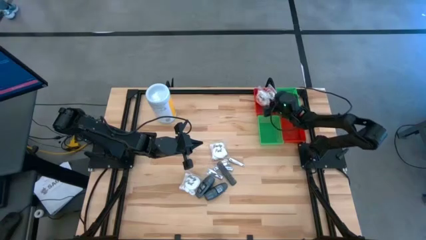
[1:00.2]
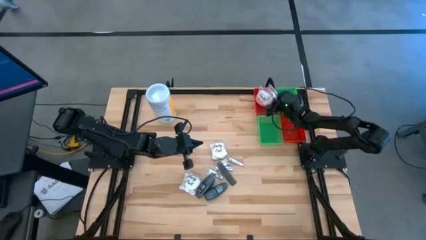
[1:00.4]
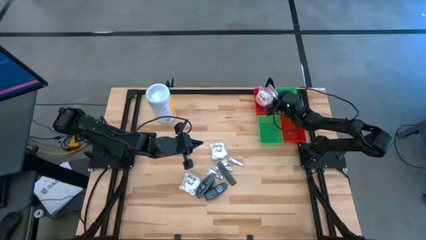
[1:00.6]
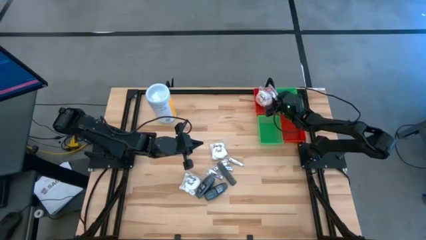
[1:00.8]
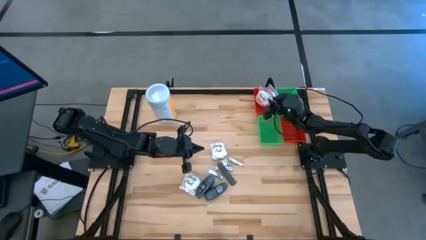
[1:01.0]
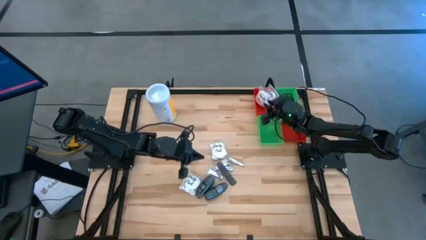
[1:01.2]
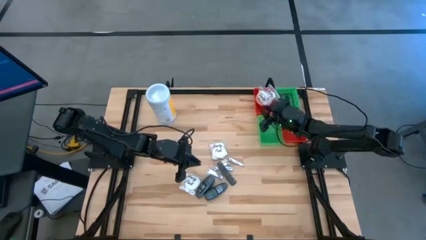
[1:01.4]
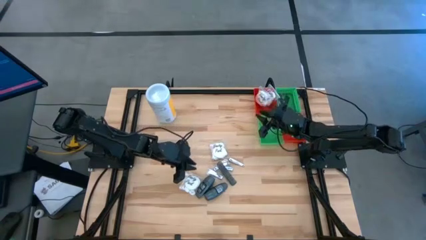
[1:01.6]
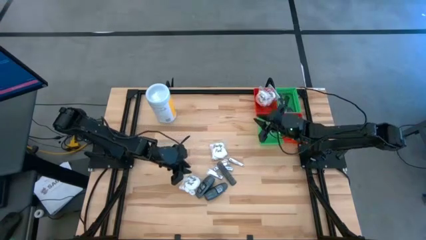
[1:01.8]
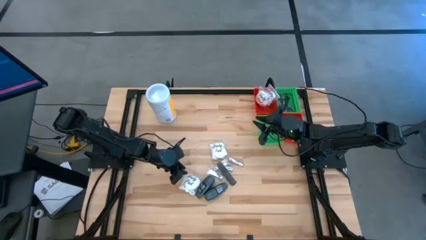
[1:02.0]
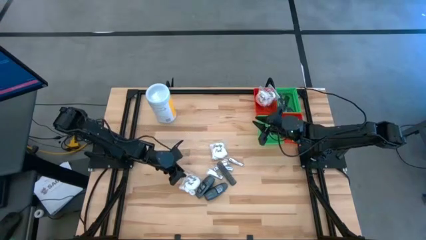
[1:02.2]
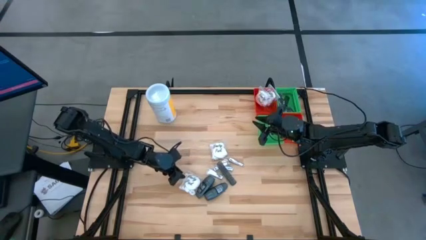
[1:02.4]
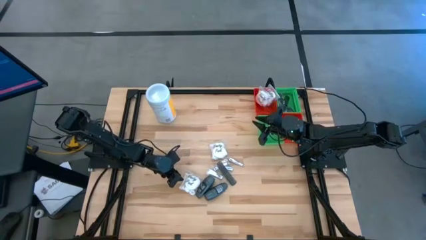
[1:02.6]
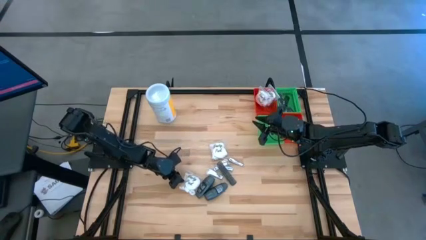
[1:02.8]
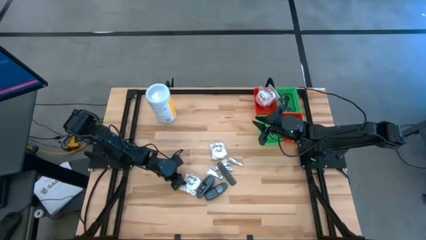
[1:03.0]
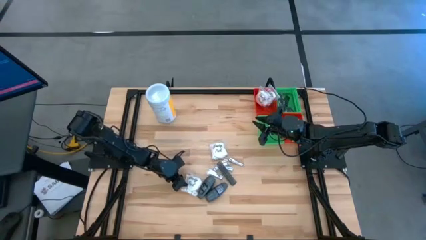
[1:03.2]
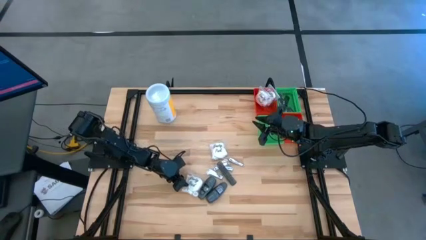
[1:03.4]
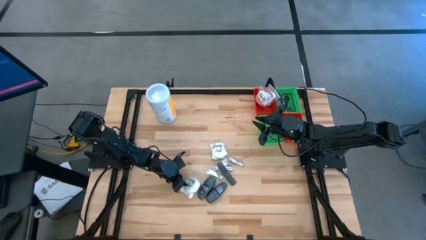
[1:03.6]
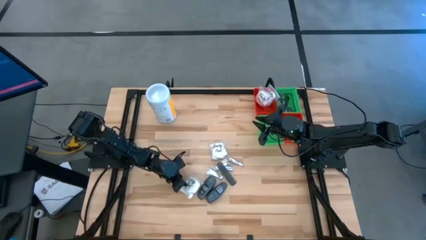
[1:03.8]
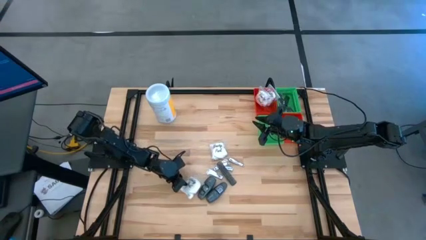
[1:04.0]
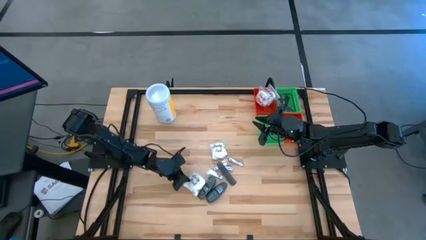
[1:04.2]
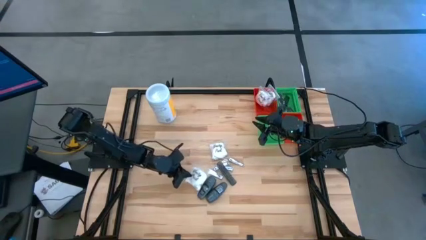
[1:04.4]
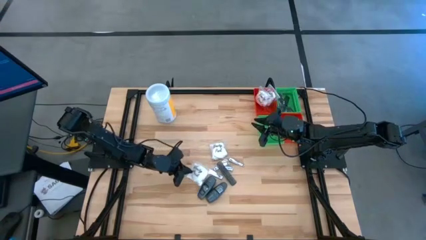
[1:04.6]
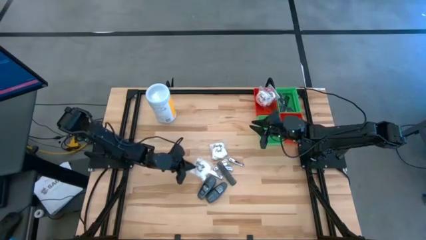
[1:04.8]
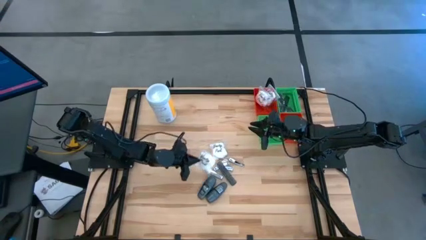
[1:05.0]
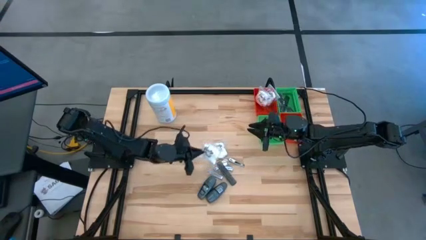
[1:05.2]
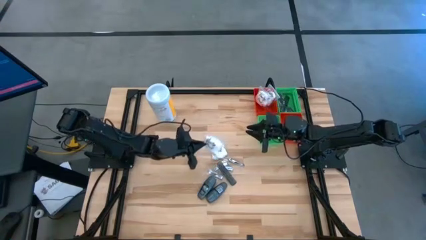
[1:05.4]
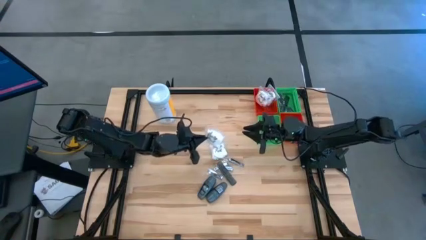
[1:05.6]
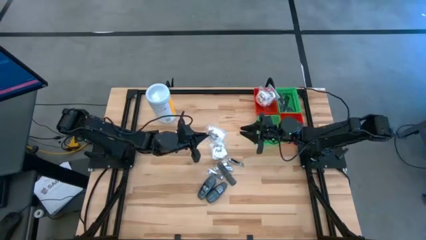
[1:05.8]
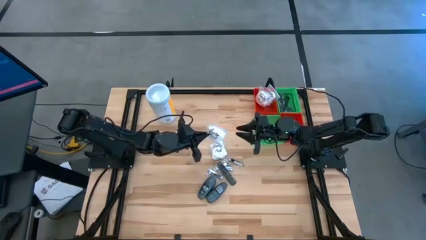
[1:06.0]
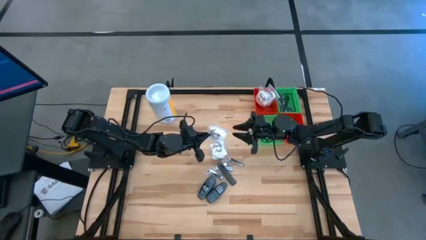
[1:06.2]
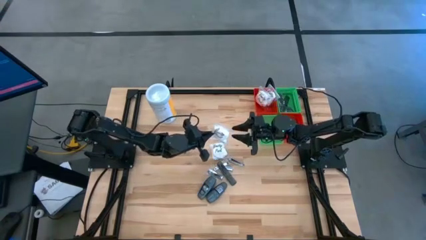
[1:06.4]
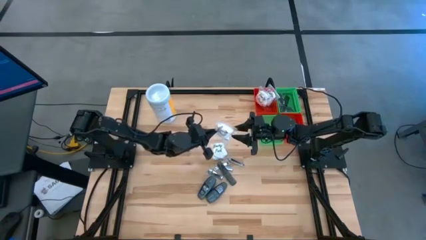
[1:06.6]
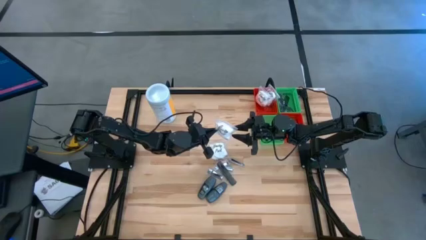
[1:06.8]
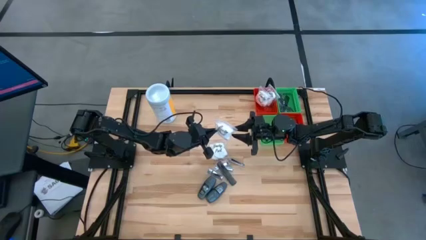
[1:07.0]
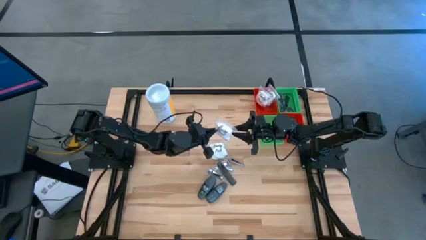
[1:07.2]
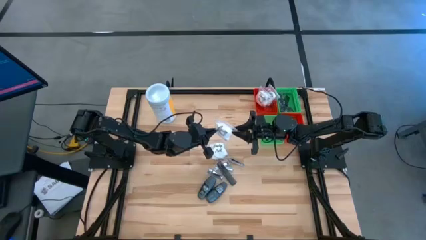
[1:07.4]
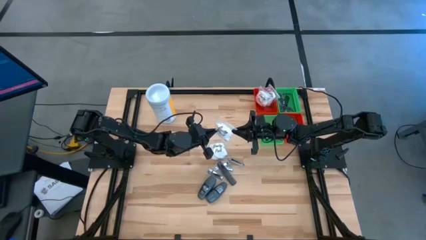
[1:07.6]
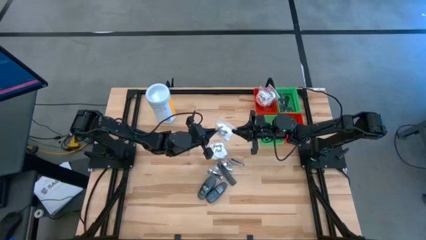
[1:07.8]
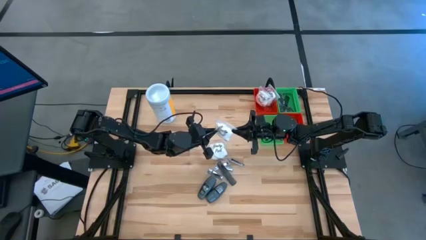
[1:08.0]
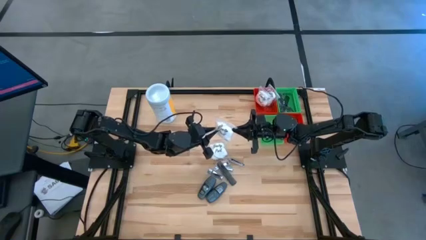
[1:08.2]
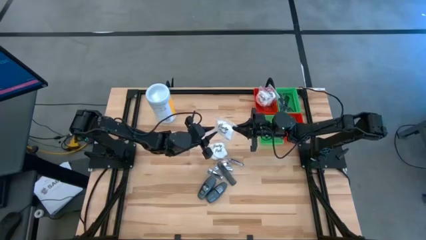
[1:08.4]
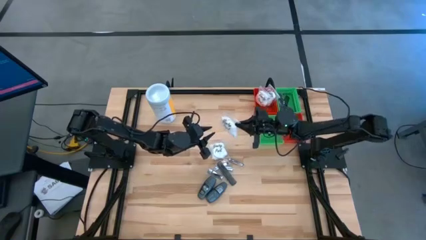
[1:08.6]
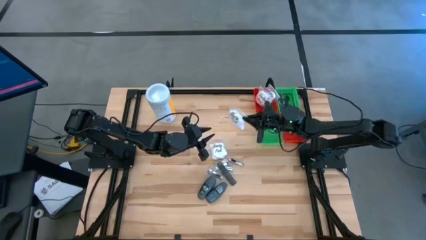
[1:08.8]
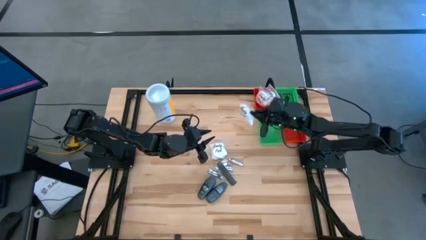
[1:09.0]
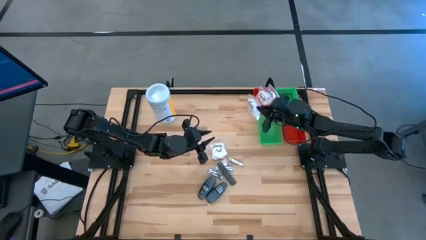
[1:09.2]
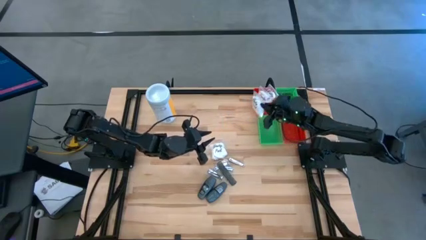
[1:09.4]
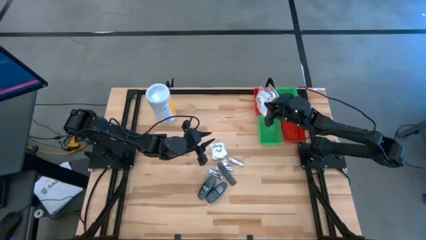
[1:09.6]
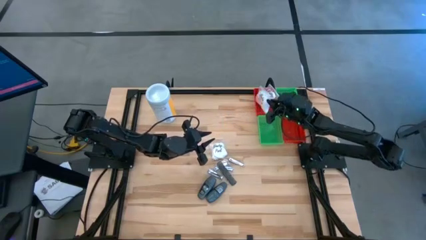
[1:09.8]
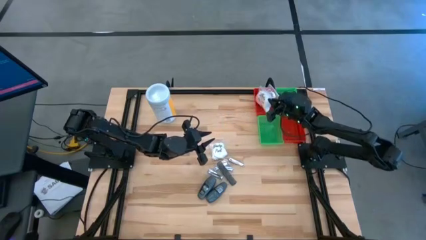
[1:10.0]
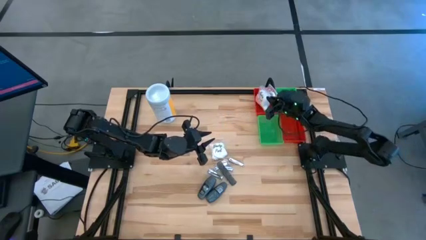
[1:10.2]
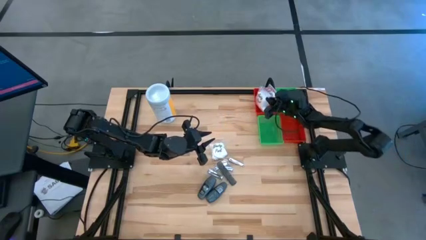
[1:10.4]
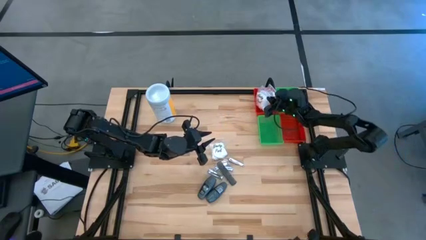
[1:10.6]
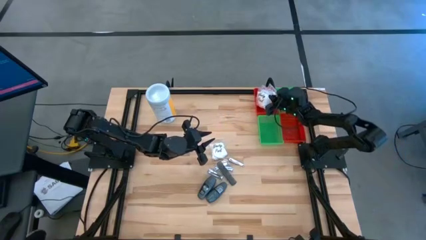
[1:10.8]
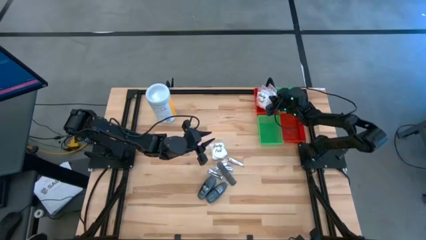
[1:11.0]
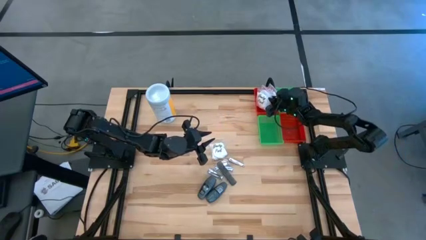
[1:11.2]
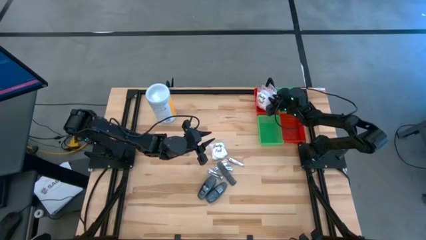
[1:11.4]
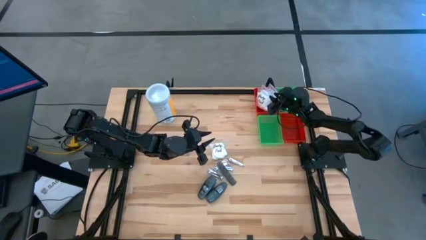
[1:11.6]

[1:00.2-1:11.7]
Task: Pick & Place Travel size toiletries
Put the white cotton pack into the top red bin

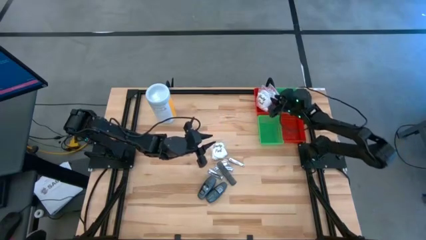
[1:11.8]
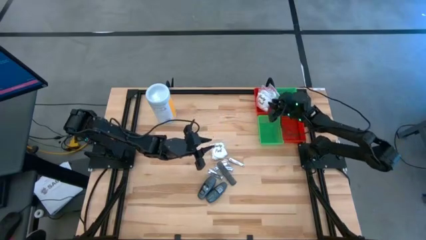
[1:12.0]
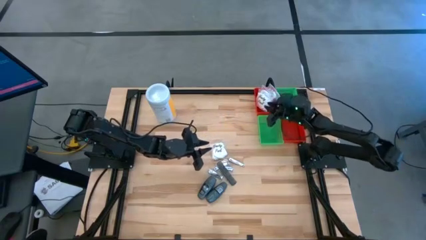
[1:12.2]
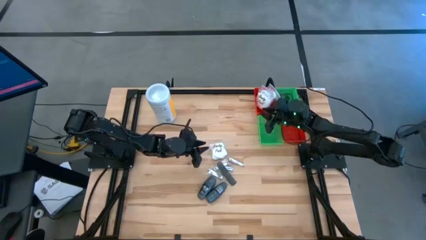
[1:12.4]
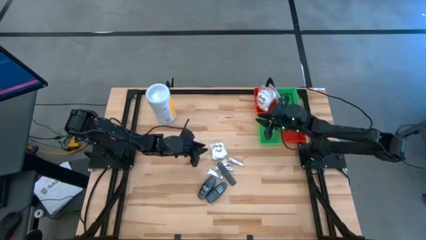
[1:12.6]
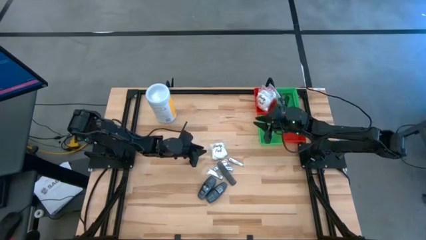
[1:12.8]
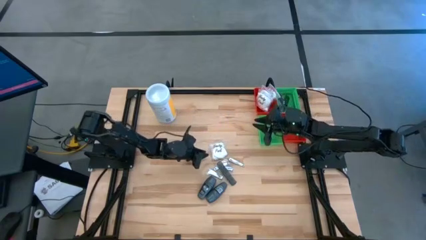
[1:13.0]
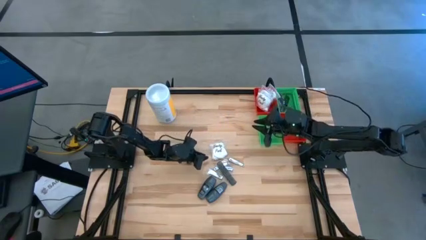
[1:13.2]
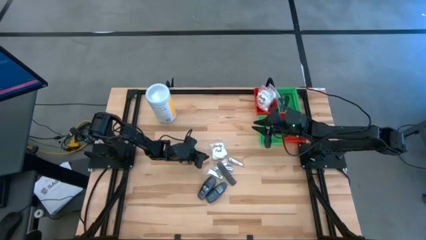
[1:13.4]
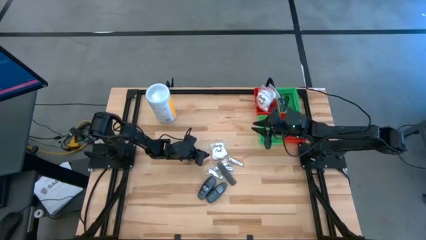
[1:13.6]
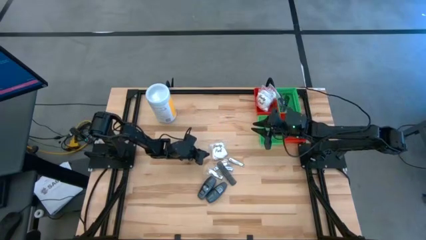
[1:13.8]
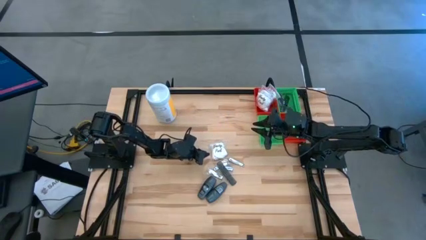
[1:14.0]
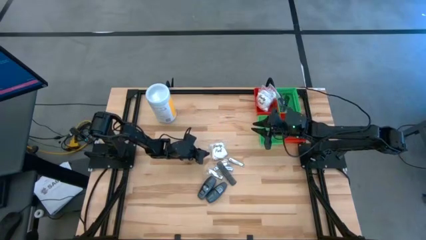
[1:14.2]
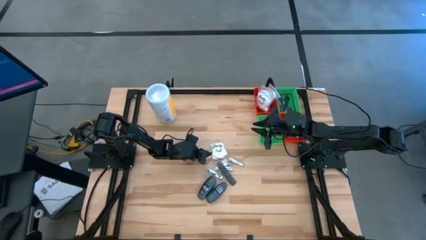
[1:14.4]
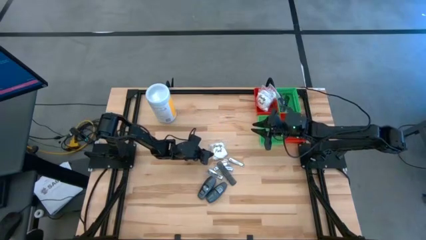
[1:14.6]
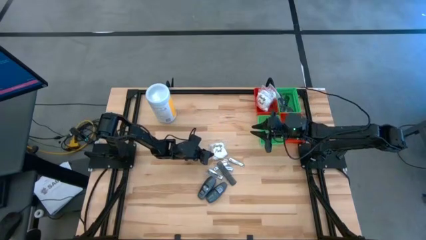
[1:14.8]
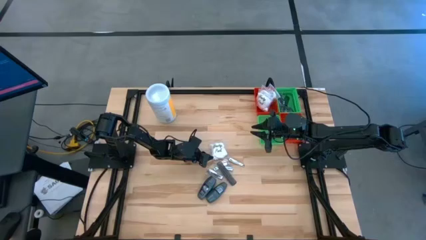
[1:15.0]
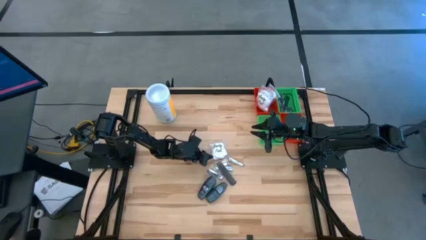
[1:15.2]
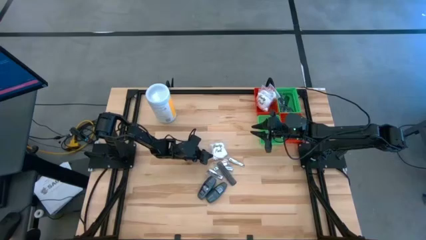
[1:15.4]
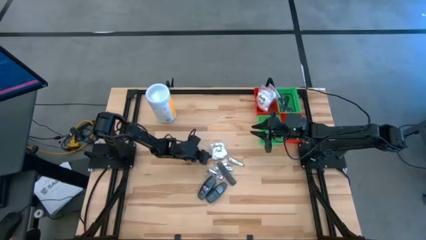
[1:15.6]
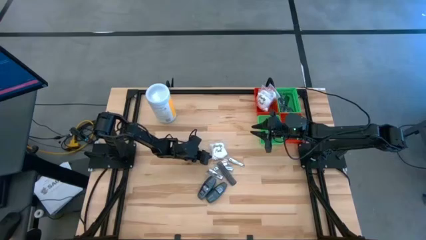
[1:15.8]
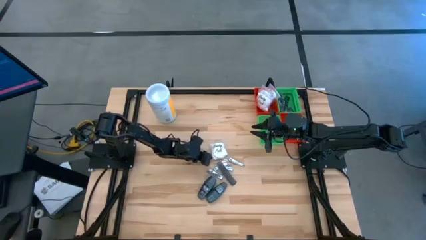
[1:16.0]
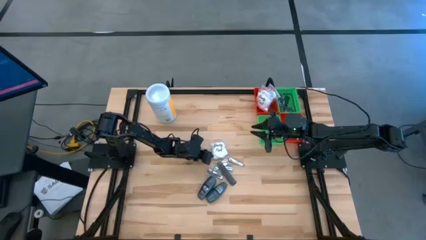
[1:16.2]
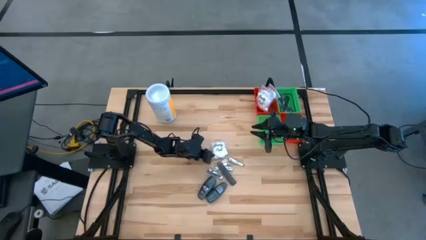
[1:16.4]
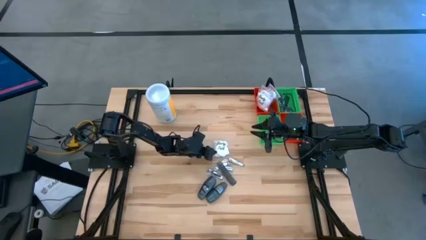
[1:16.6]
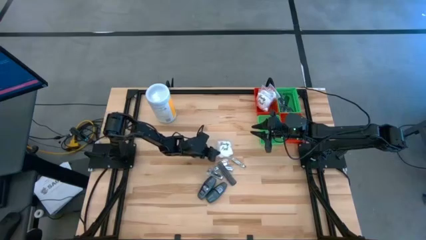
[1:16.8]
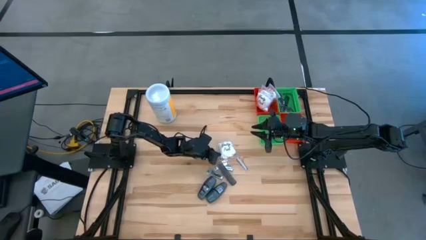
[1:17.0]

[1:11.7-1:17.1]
Put the white cotton pack into the top red bin
